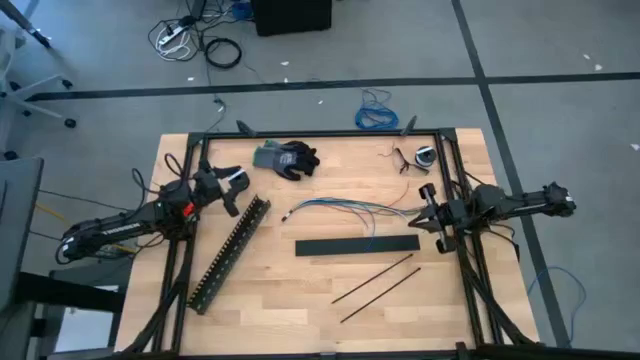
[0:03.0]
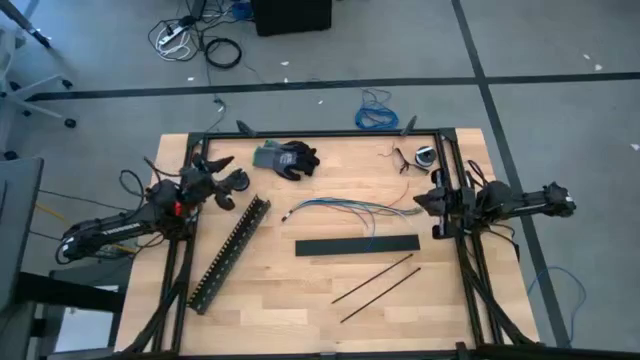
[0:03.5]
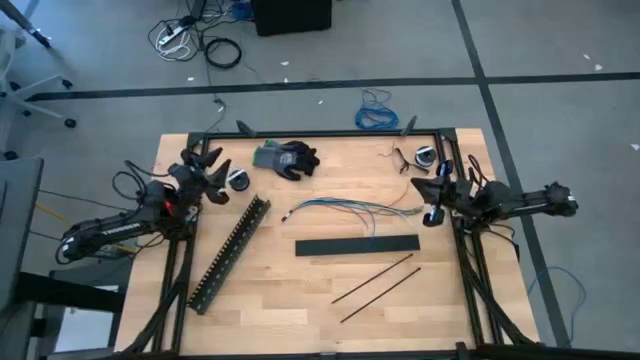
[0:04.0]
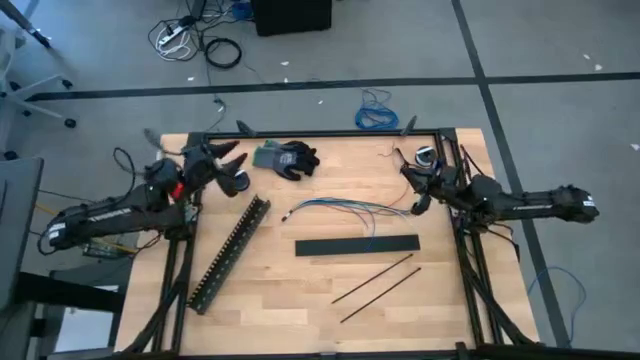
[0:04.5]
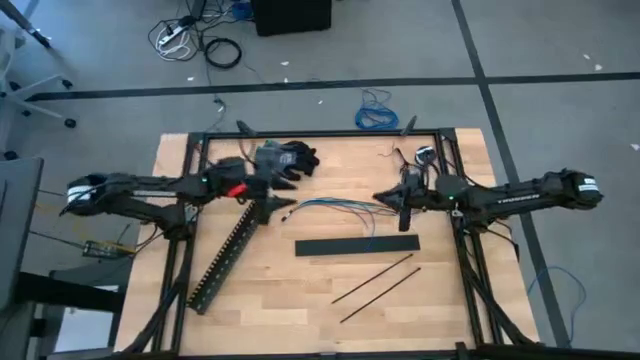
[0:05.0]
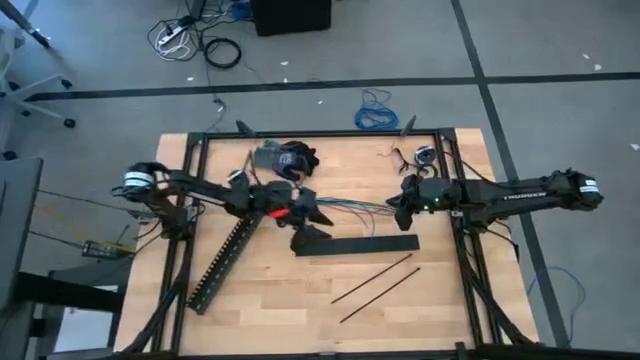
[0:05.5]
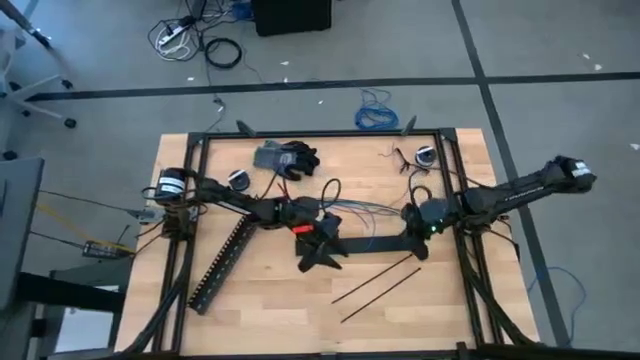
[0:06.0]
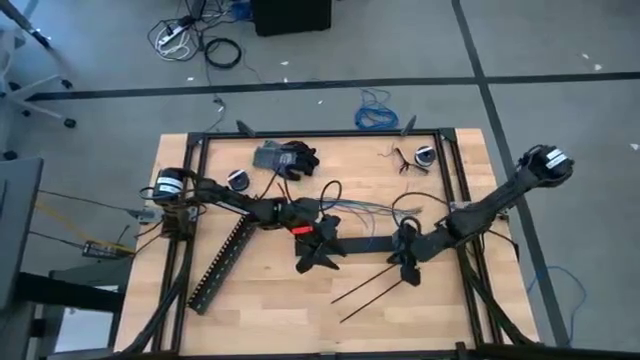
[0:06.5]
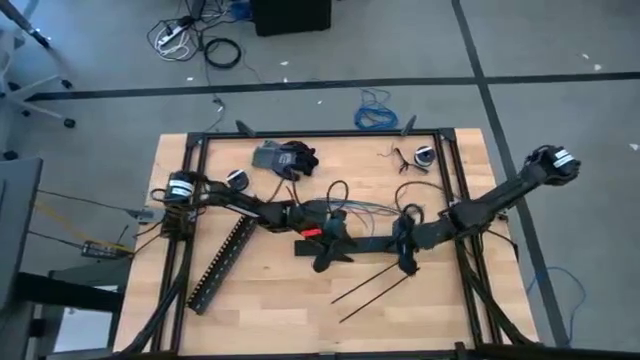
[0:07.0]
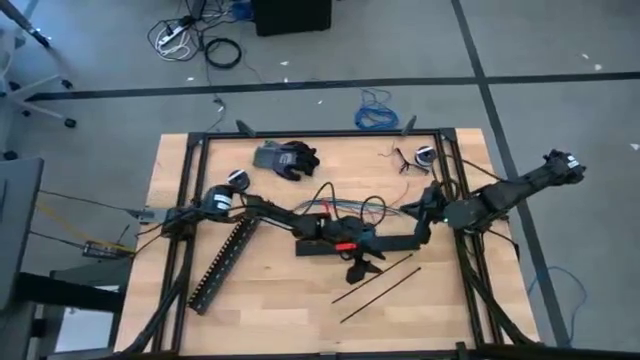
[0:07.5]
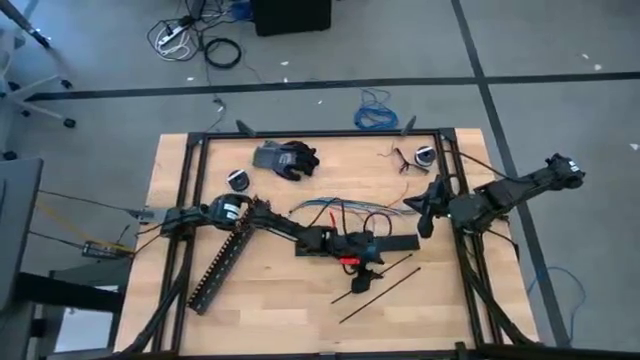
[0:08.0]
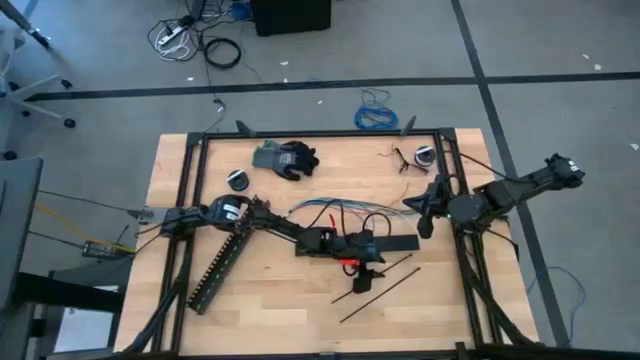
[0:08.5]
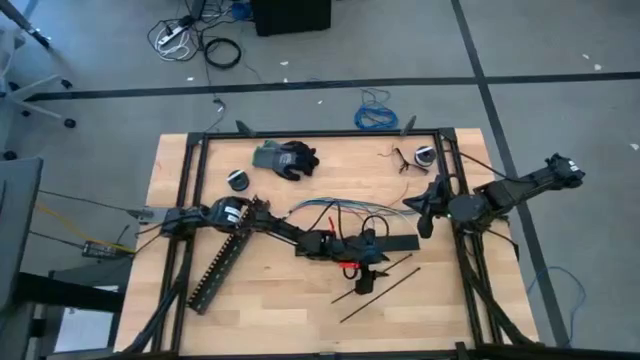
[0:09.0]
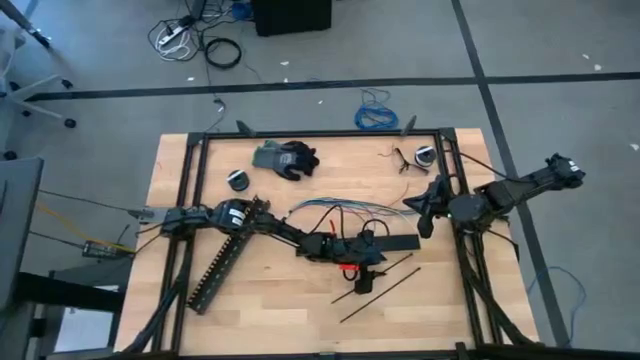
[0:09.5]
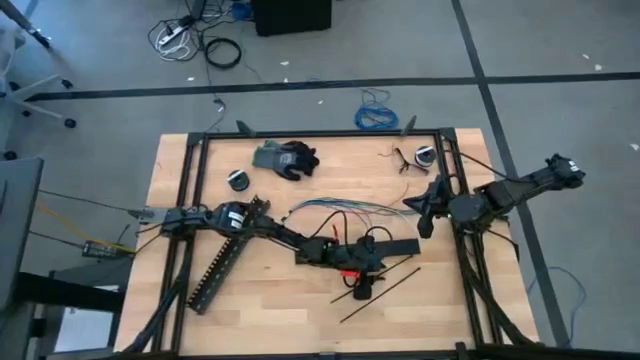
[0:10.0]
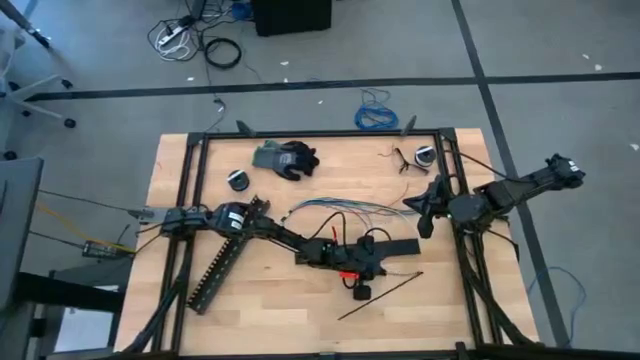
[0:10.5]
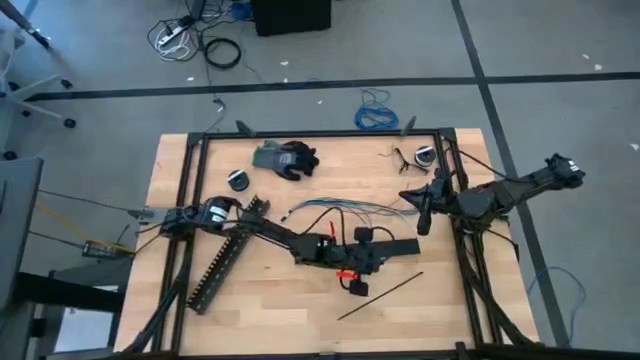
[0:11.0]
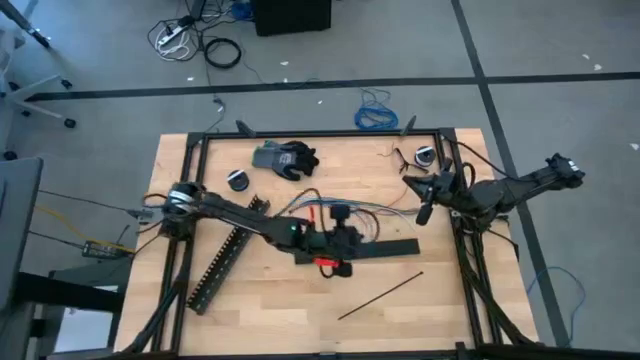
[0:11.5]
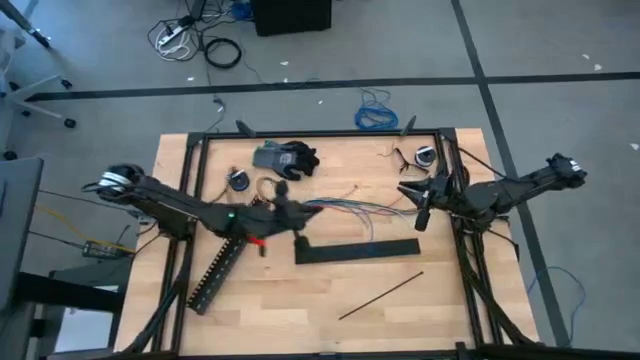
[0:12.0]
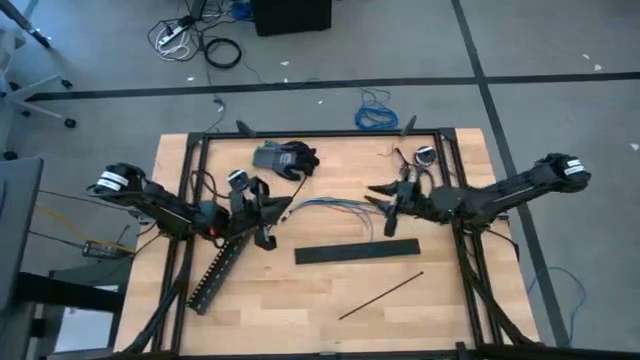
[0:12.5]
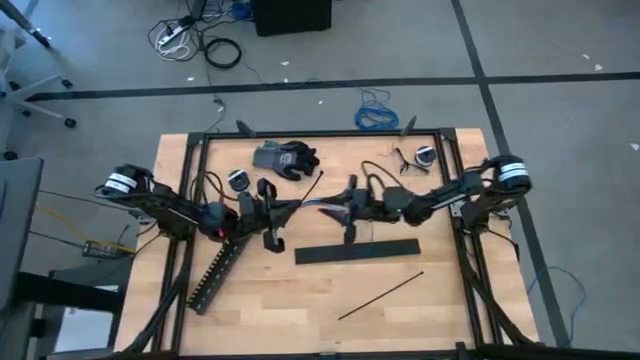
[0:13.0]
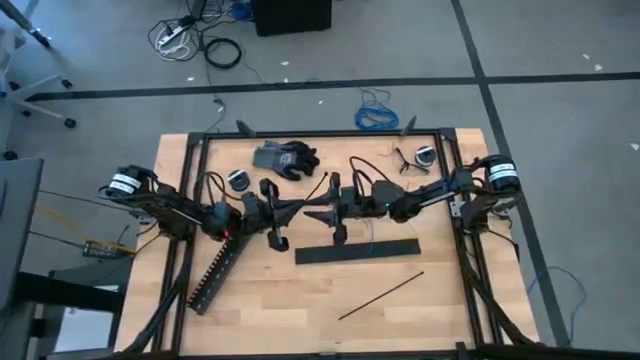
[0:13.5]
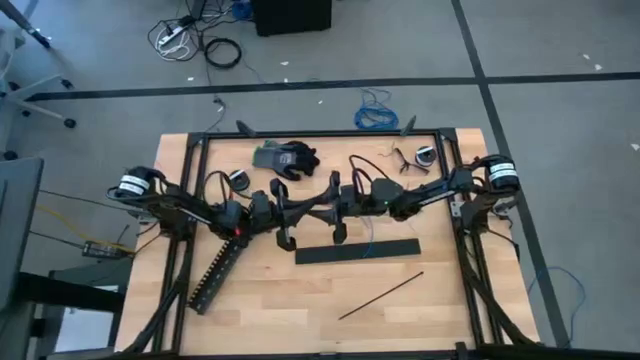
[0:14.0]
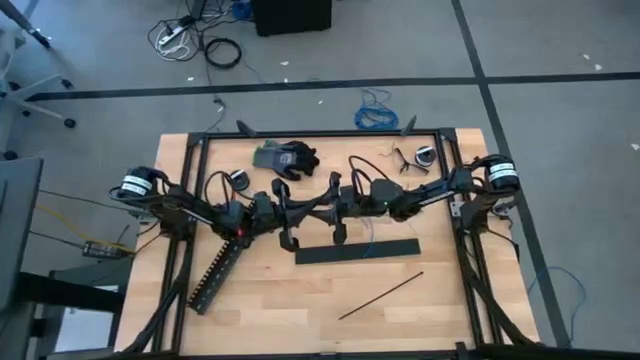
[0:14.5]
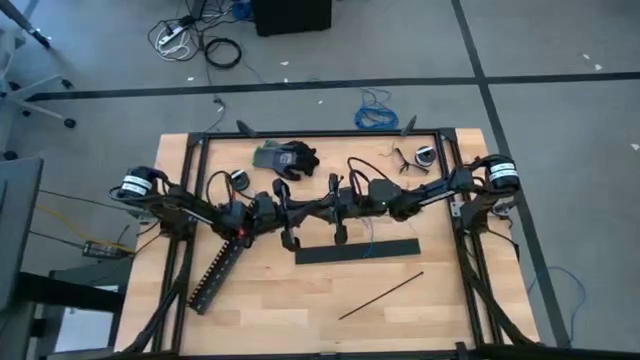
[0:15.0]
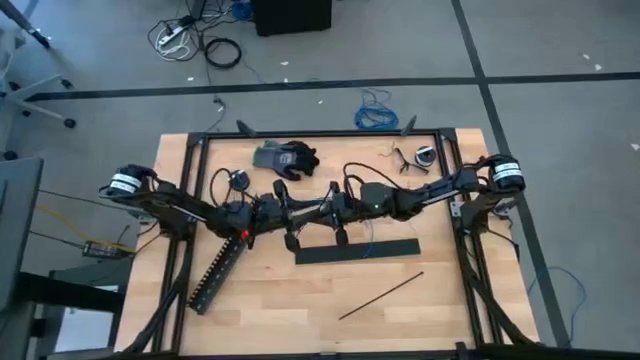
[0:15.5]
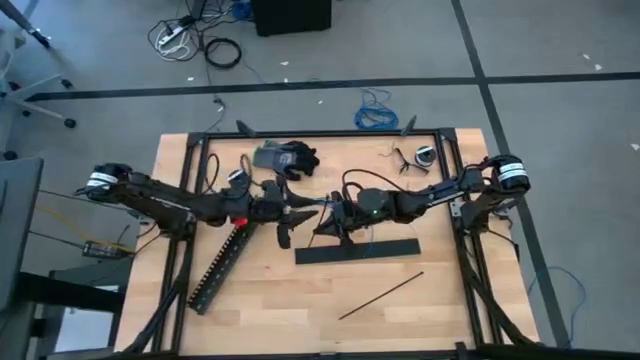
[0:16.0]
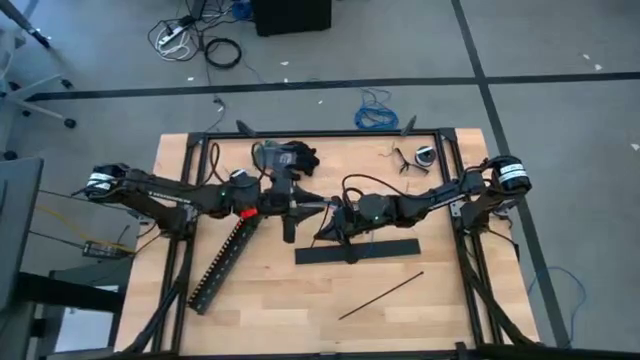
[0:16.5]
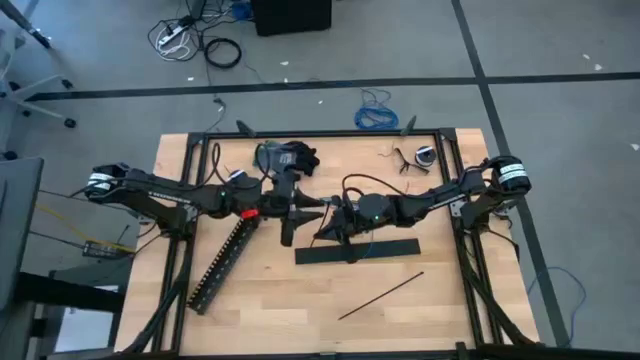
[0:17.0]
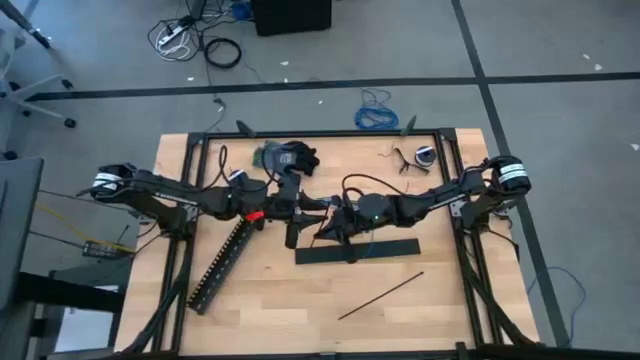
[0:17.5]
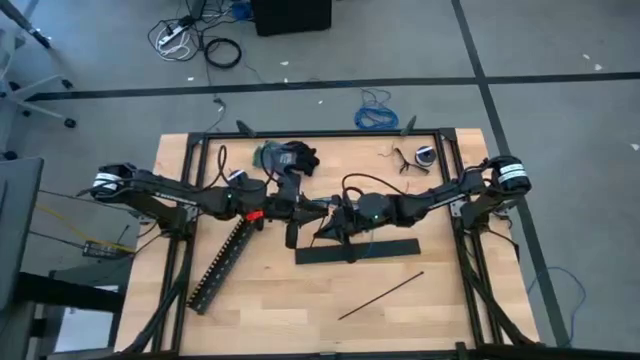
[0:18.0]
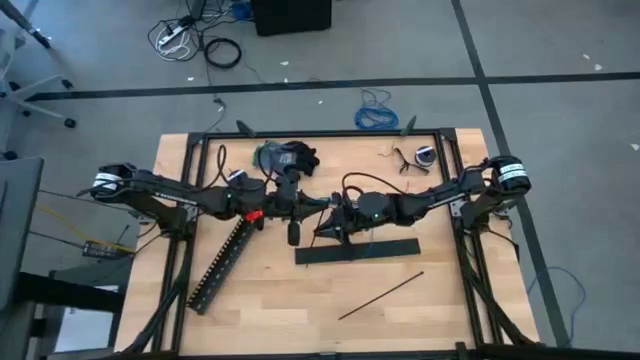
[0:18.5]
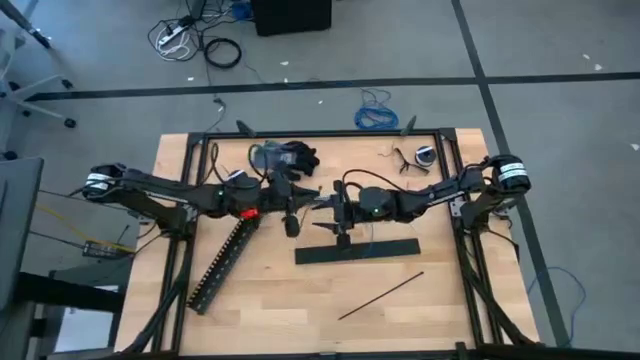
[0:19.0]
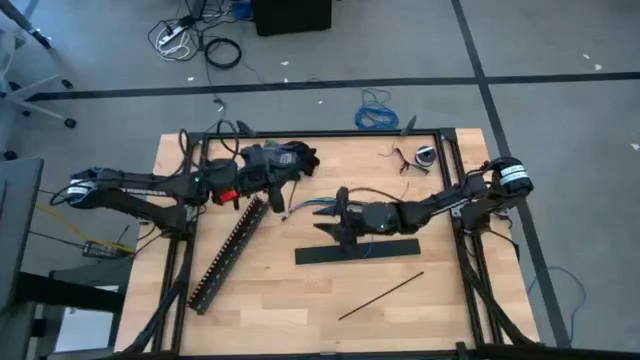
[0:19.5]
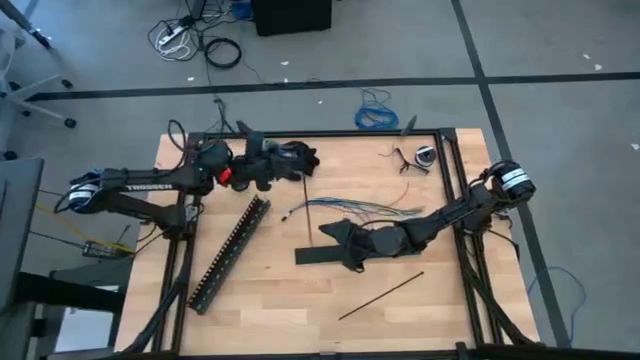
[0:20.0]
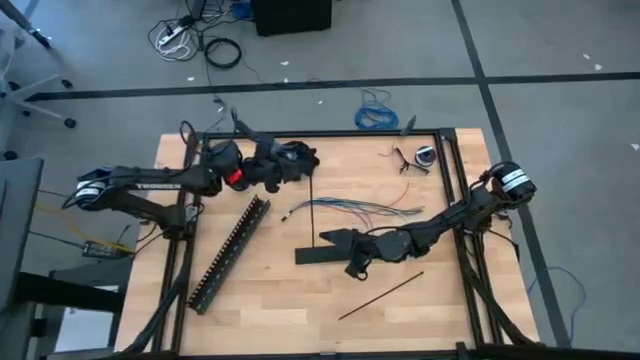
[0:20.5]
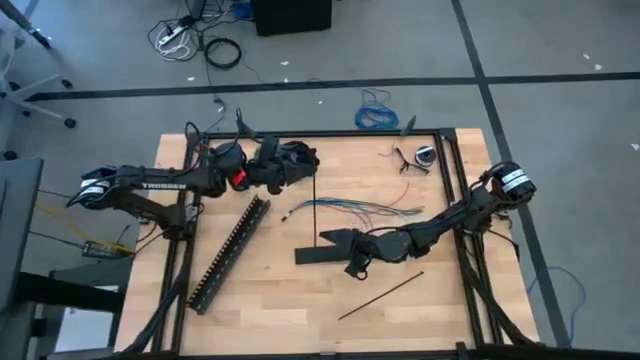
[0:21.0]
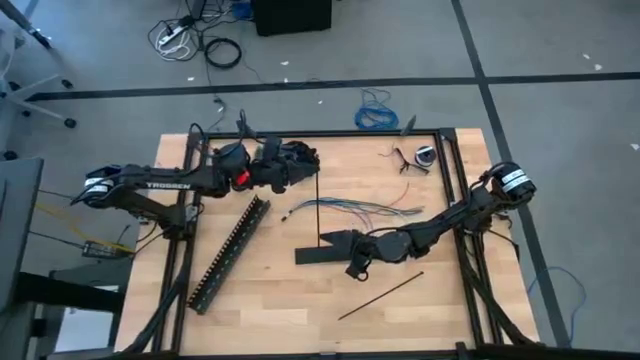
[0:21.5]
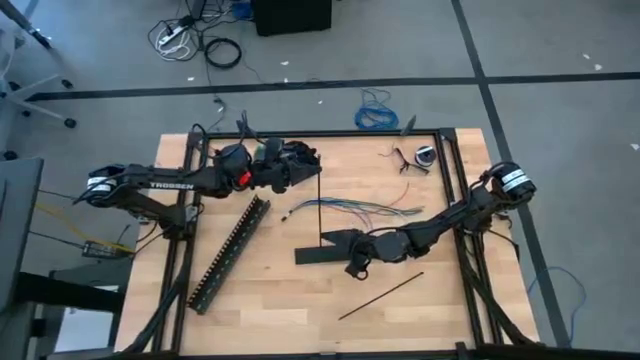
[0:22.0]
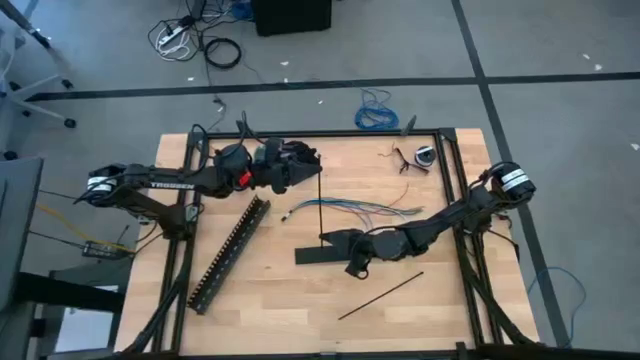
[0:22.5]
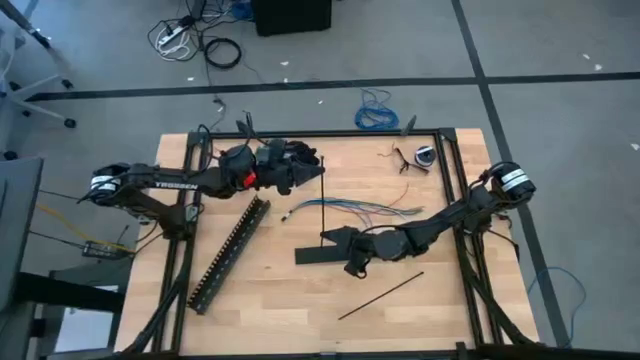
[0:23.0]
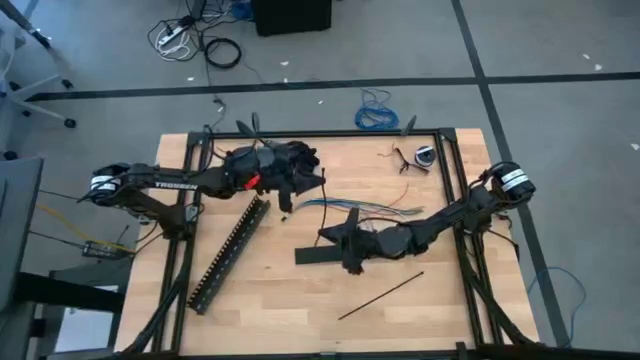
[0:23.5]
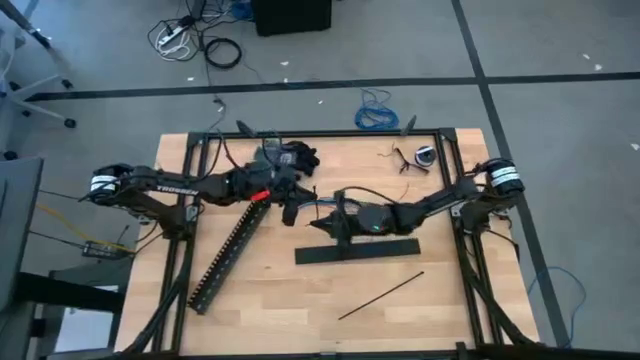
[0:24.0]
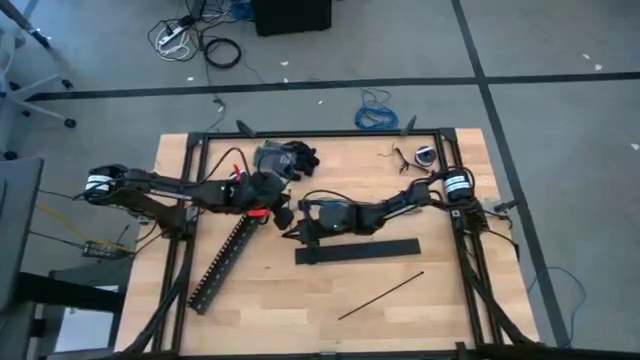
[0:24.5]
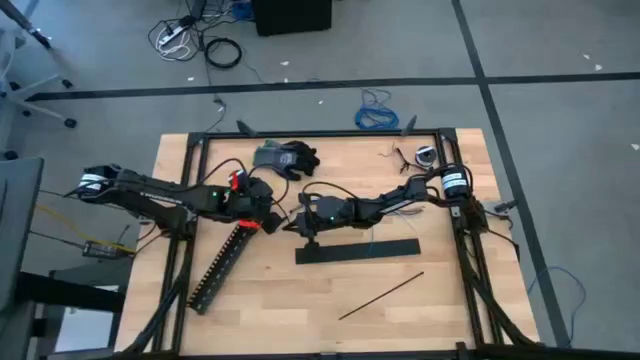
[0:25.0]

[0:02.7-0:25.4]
Task: Ziptie cables
Wrap the black zip tie on the cable wires
